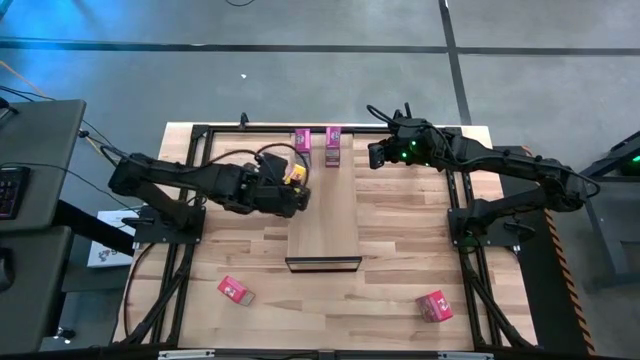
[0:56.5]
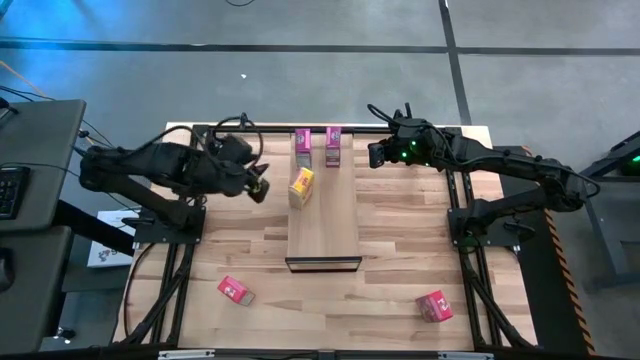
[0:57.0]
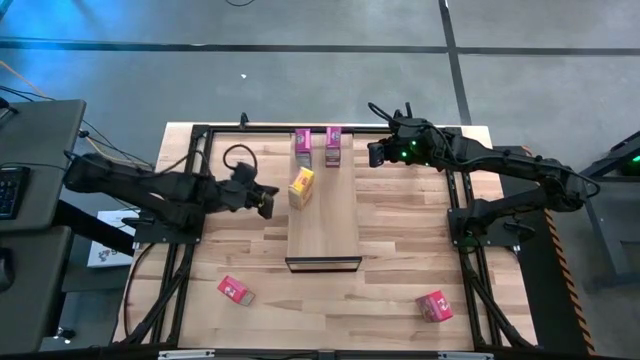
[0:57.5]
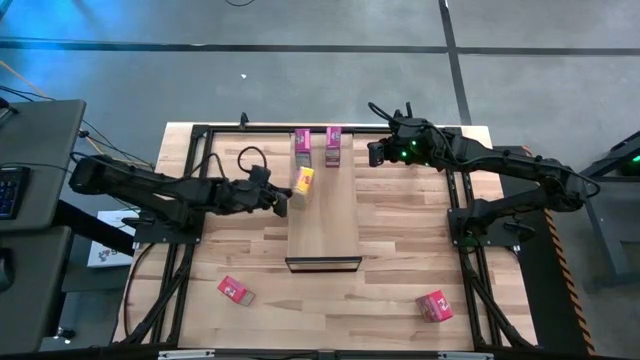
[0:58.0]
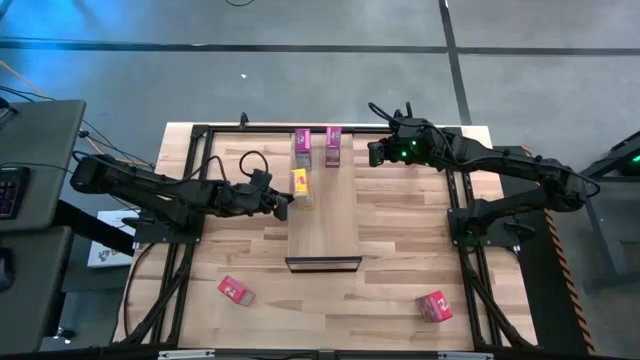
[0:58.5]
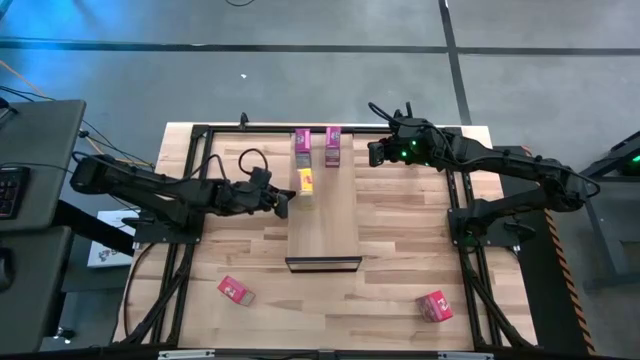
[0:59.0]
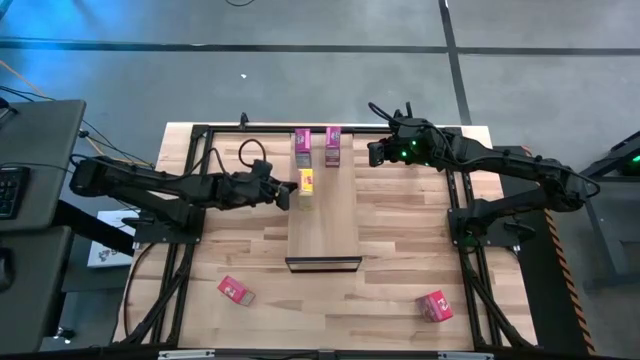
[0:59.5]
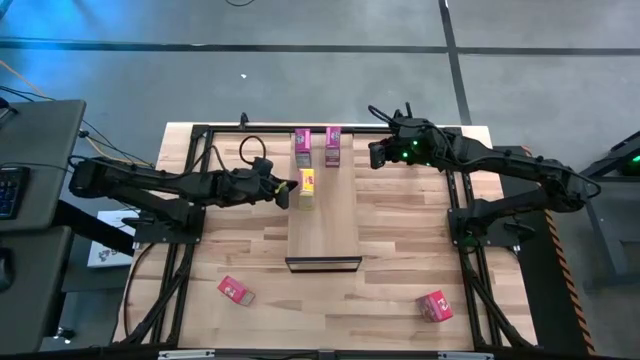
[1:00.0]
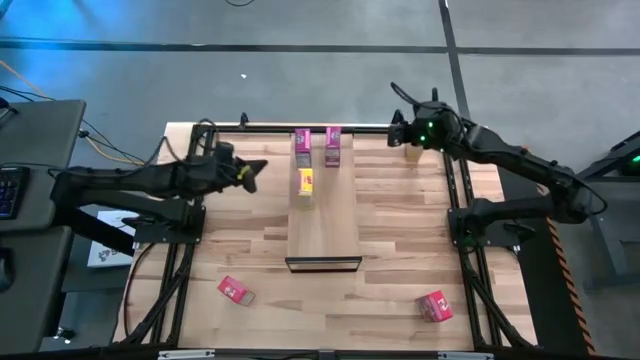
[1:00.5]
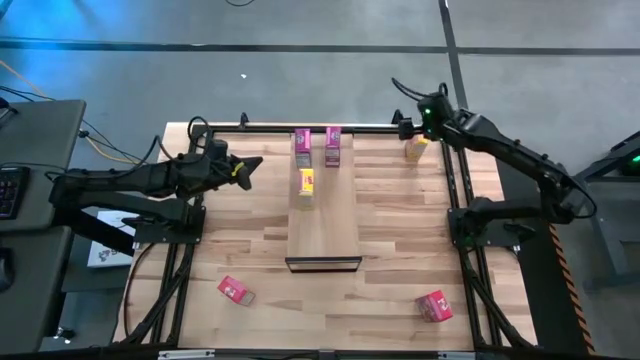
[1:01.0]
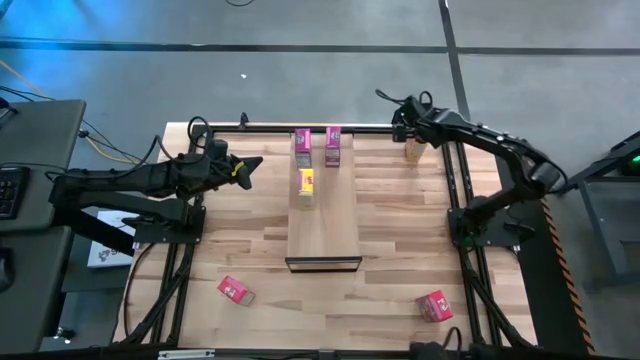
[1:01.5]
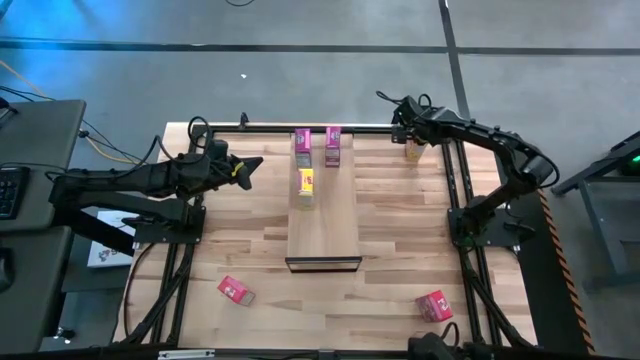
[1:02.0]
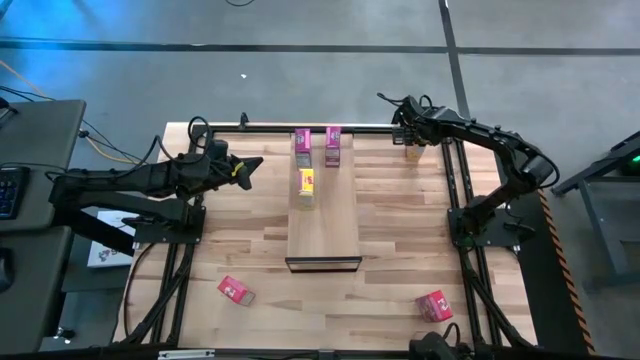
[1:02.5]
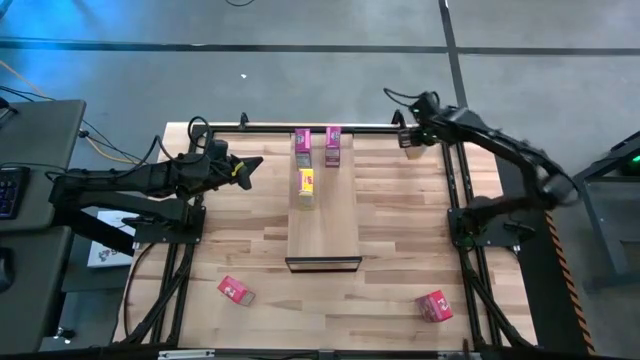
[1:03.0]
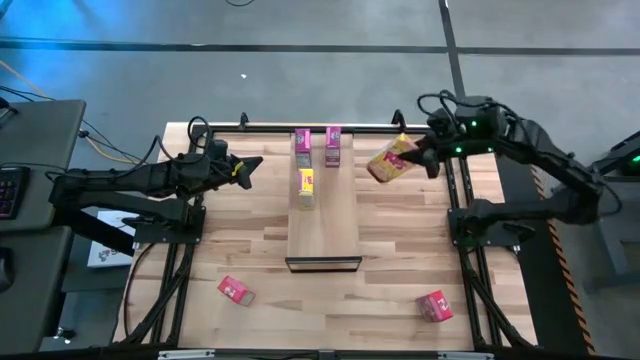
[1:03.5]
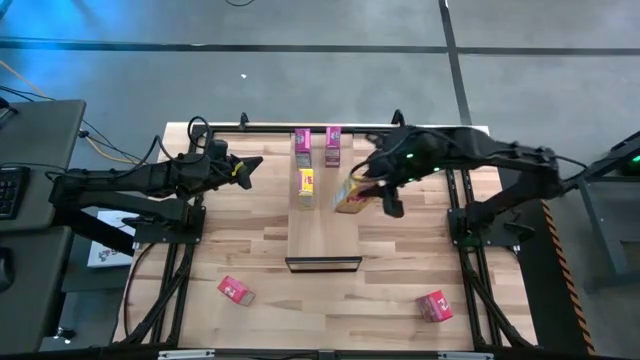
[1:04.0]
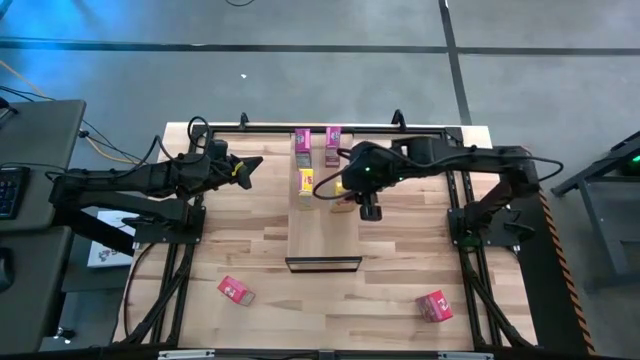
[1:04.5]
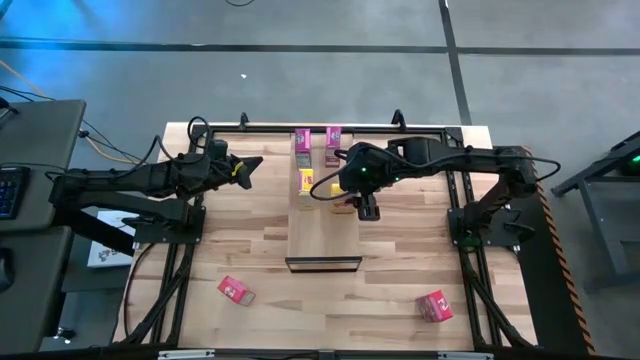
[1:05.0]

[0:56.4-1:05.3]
Task: Stack cereal on shelf
Put the yellow cereal box on the shelf aligned with the other yellow cereal box

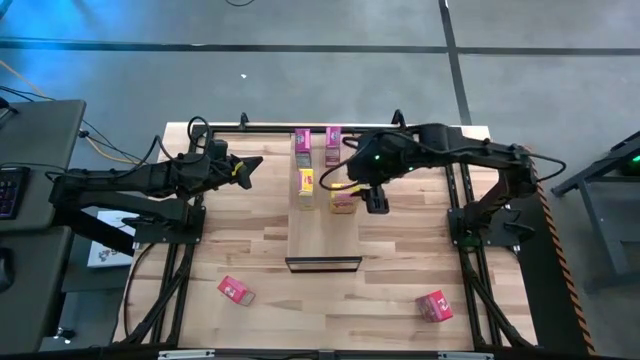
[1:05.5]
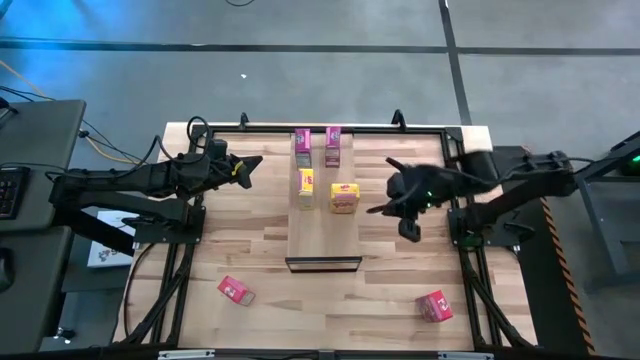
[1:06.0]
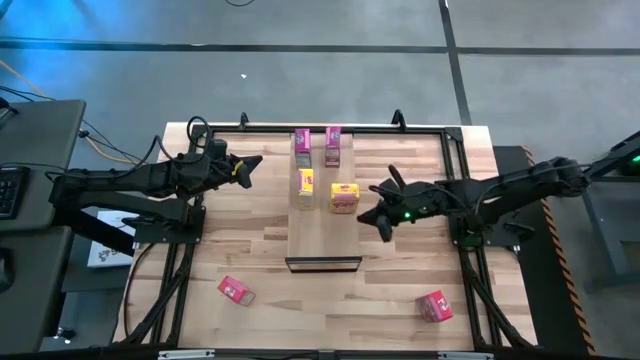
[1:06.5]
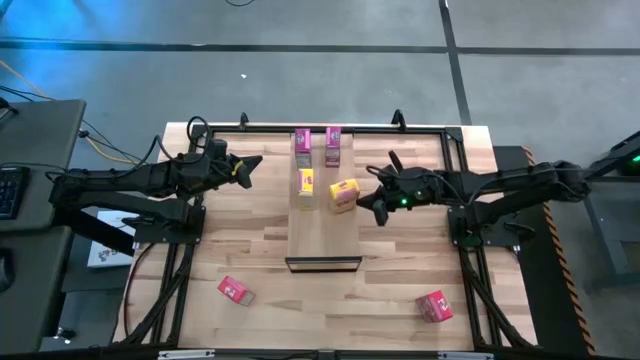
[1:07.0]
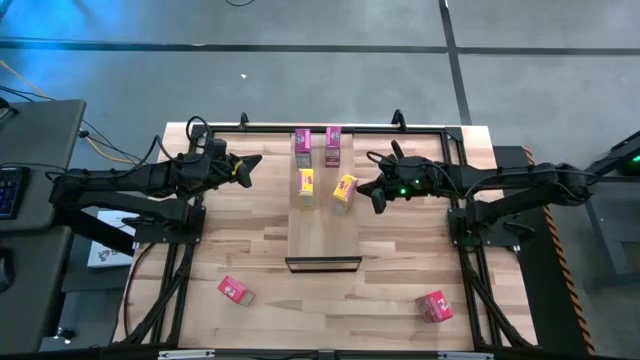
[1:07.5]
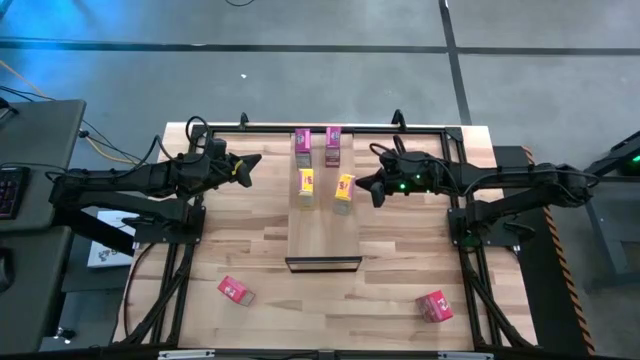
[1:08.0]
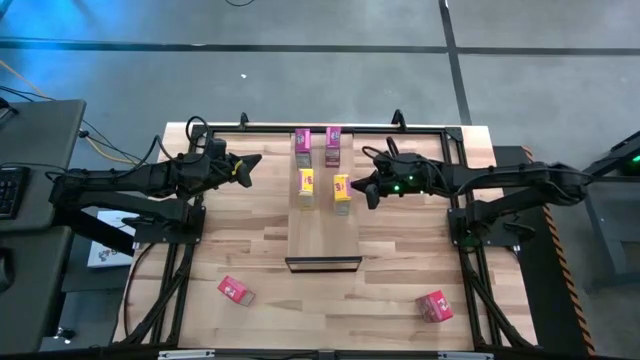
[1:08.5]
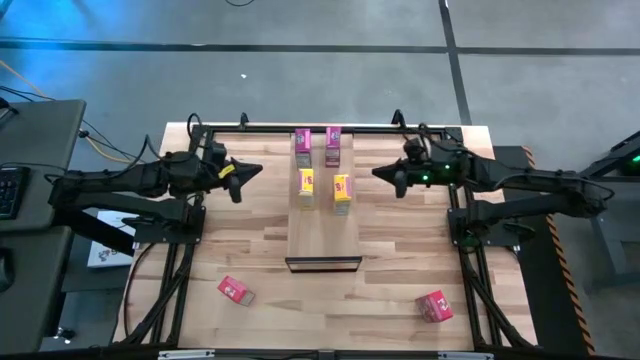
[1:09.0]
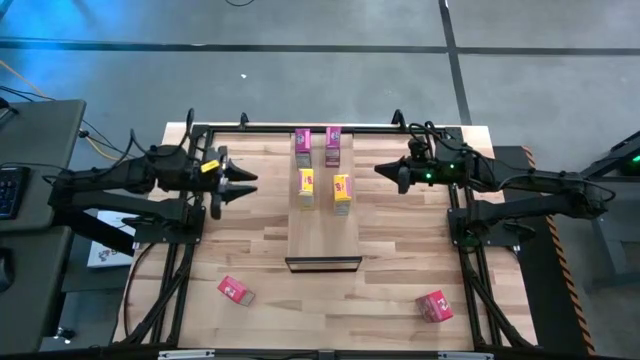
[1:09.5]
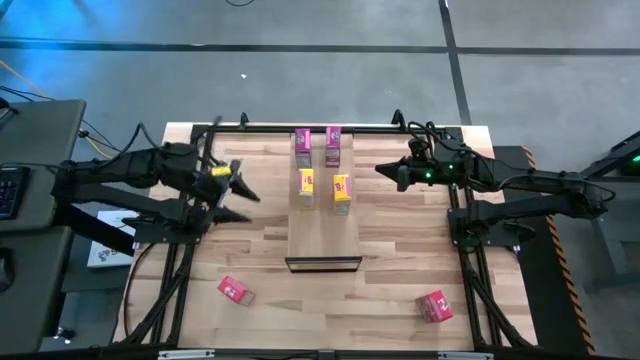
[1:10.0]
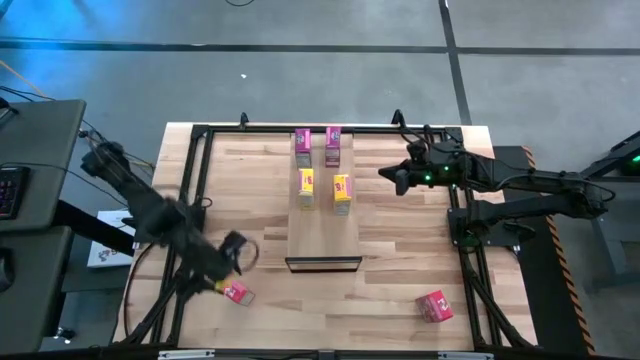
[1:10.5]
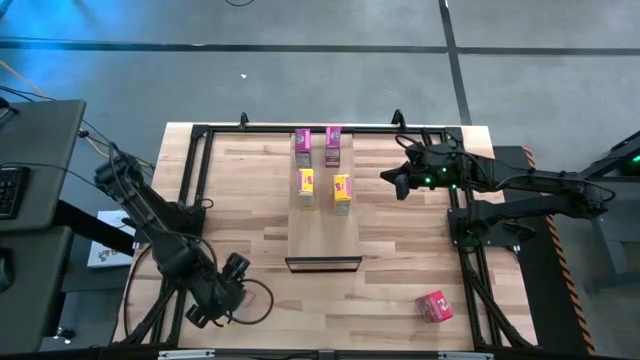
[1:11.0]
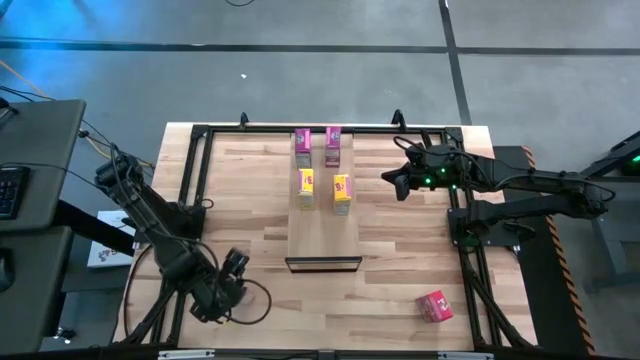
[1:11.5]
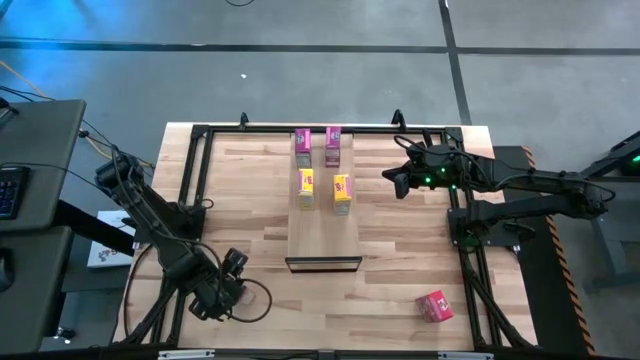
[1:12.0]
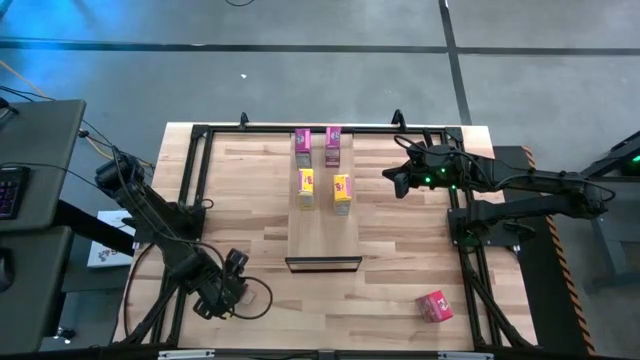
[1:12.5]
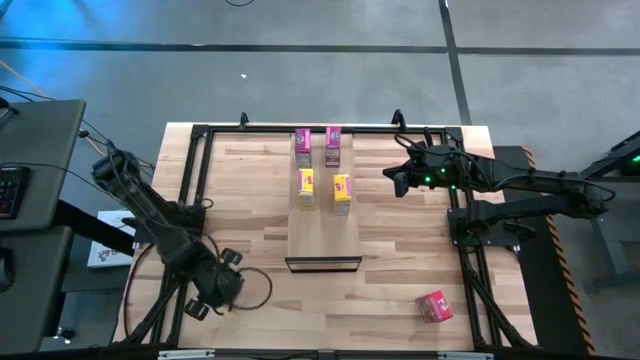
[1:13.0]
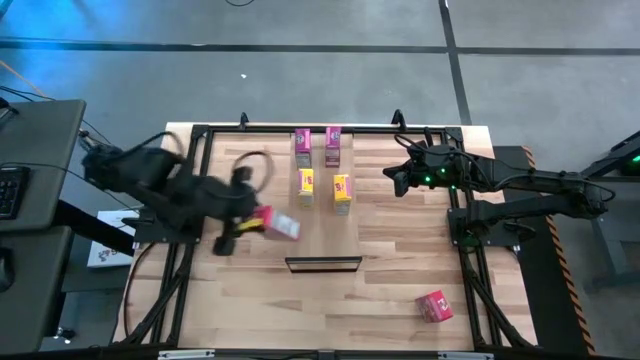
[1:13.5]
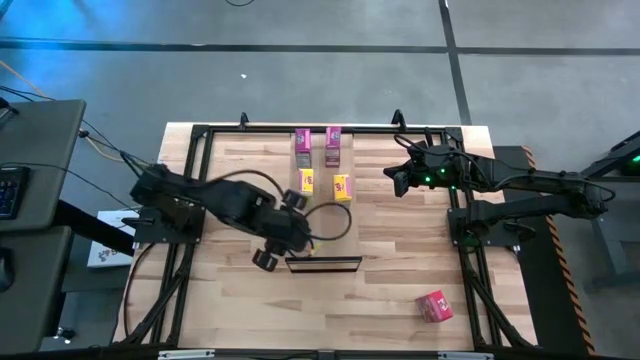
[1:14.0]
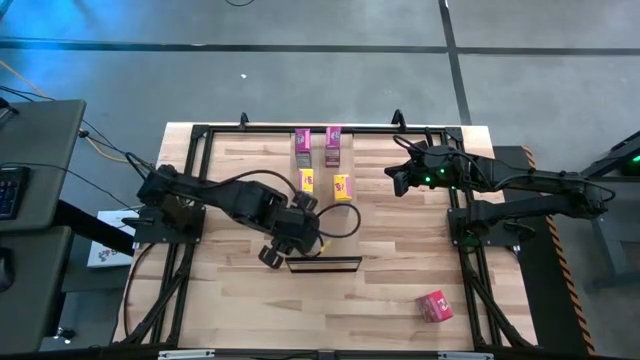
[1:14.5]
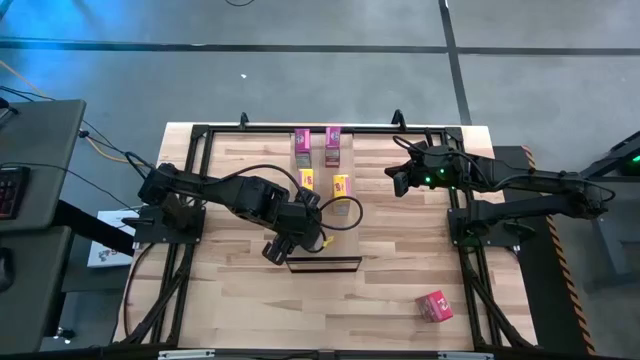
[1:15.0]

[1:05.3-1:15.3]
Put the left red cereal box on the shelf

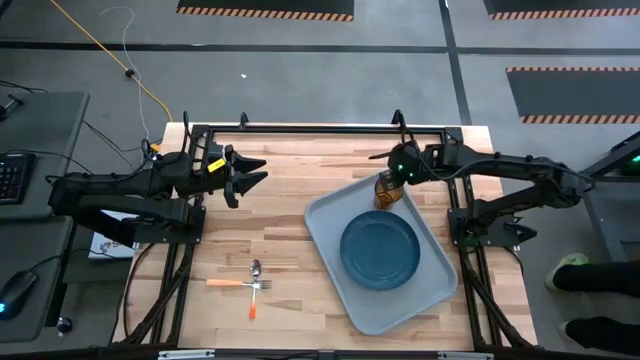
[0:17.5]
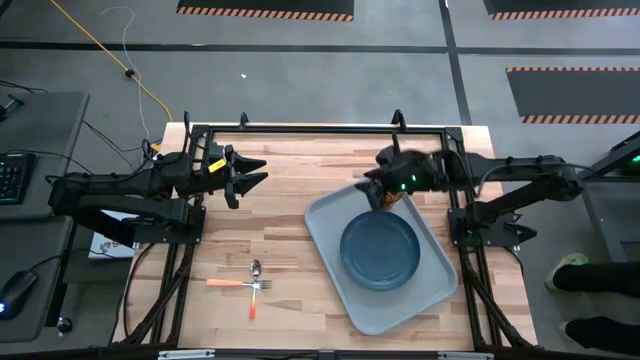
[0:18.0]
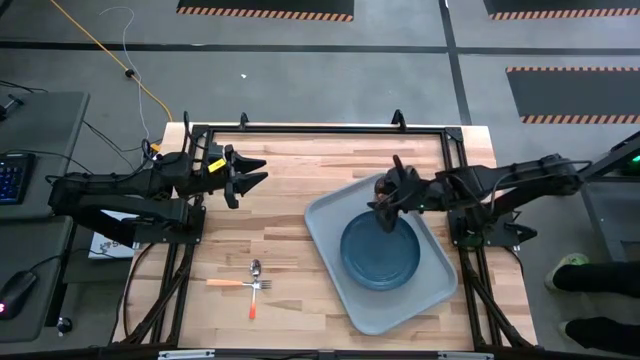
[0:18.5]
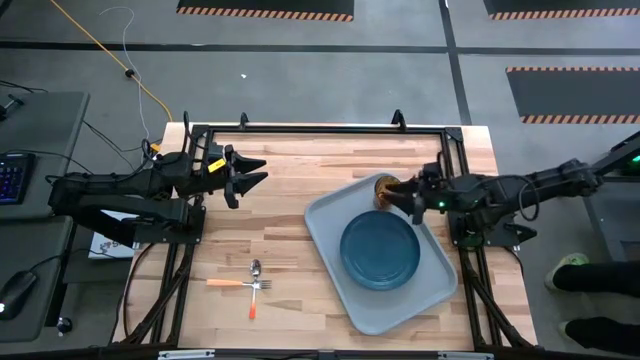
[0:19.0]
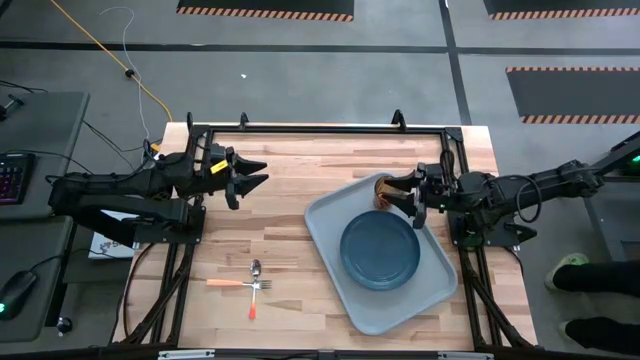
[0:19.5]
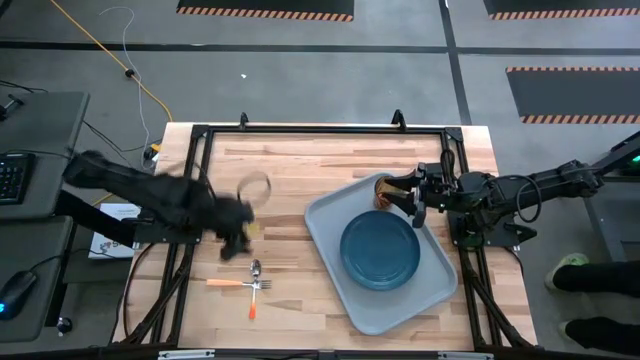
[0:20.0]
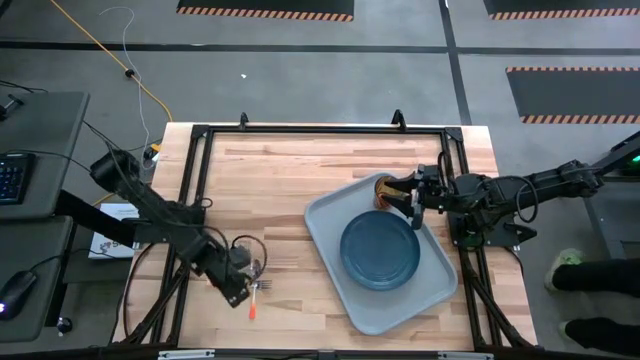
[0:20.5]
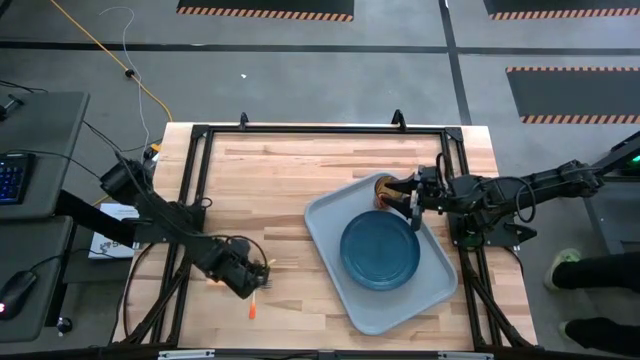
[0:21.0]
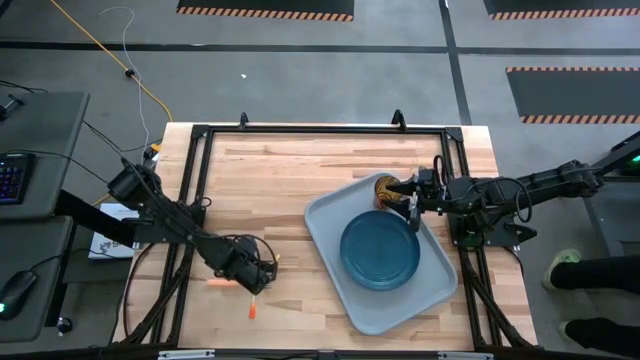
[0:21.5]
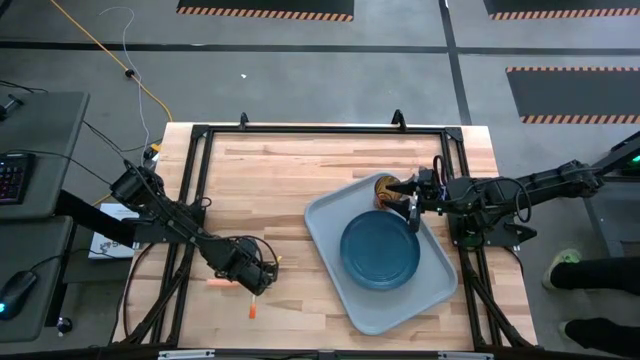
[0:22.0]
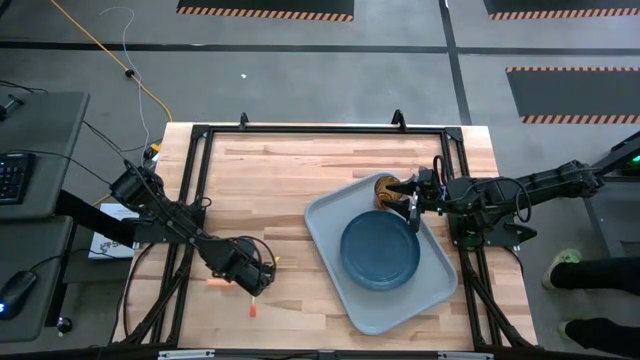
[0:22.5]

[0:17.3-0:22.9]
Task: Pick and place plate/cup/fork/spoon on tray
Put the orange spoon on the gray serving tray to the left of the blue plate
